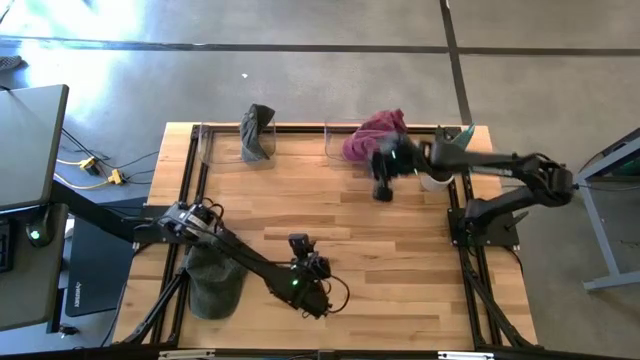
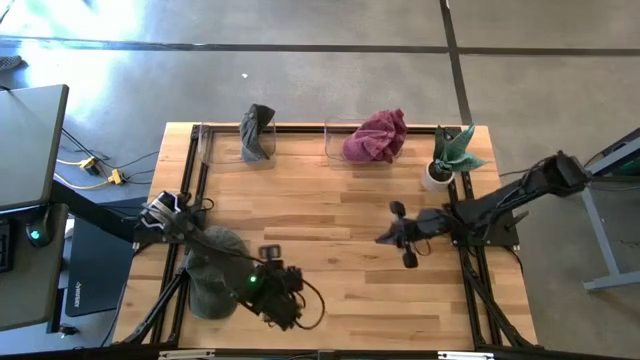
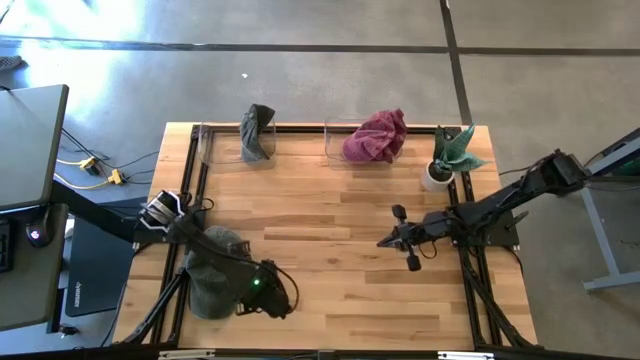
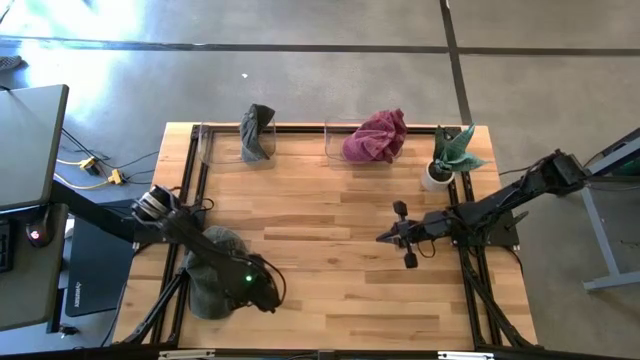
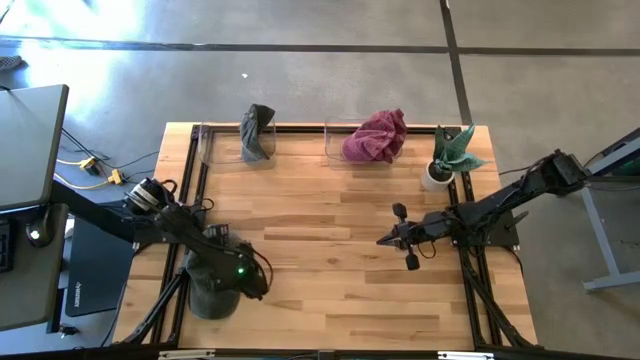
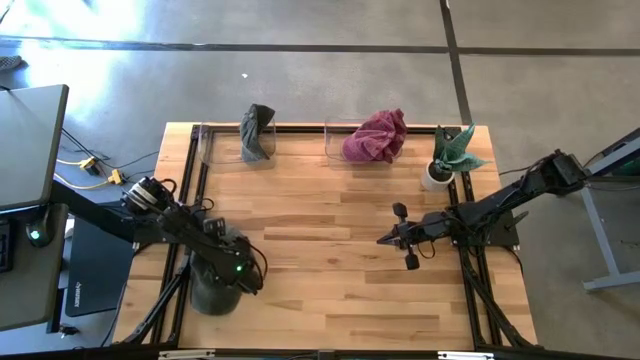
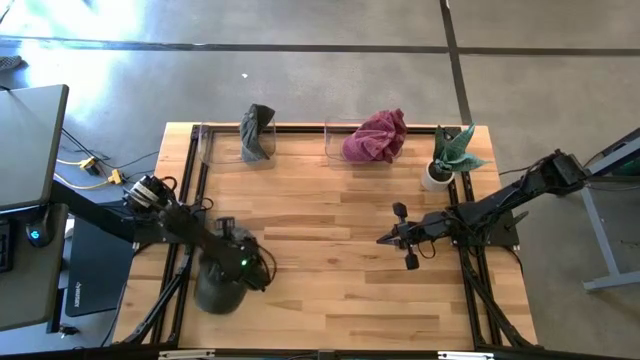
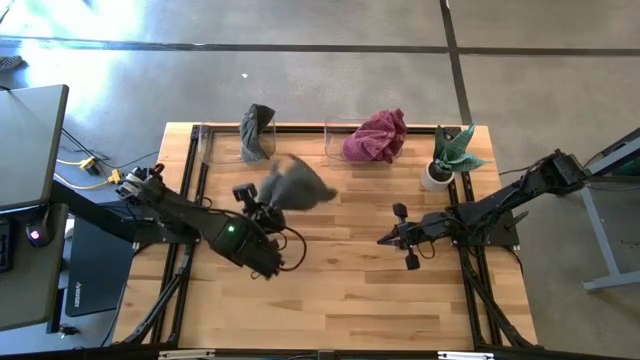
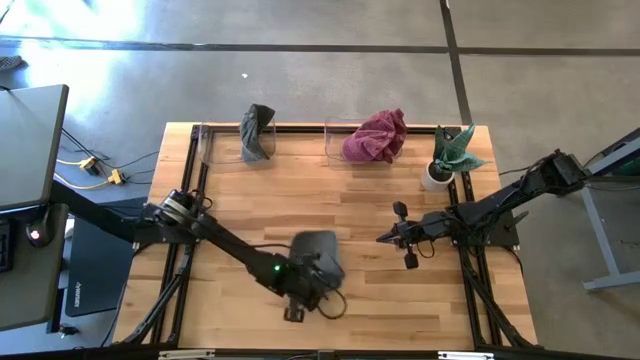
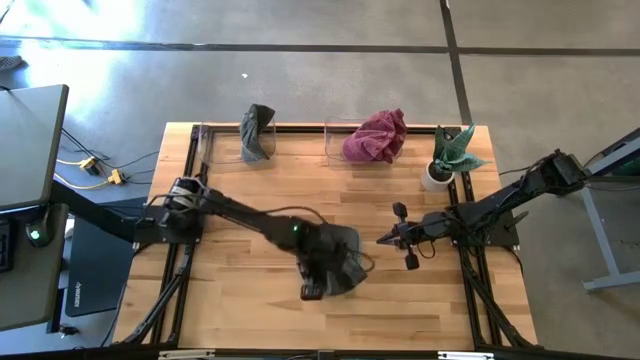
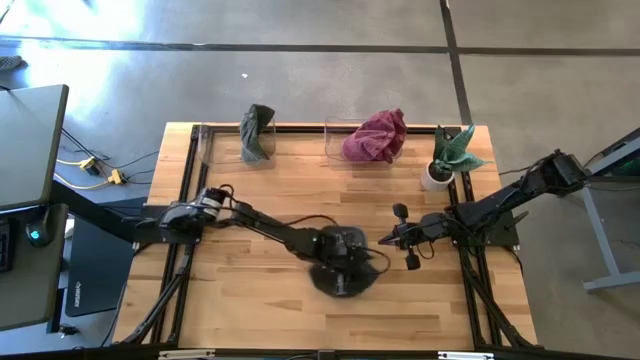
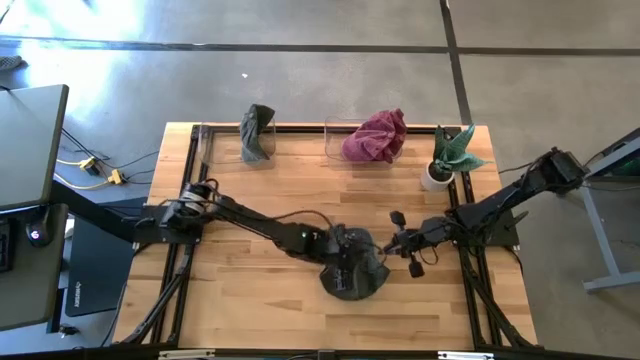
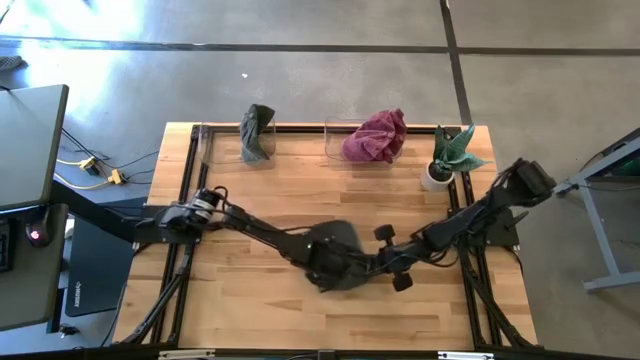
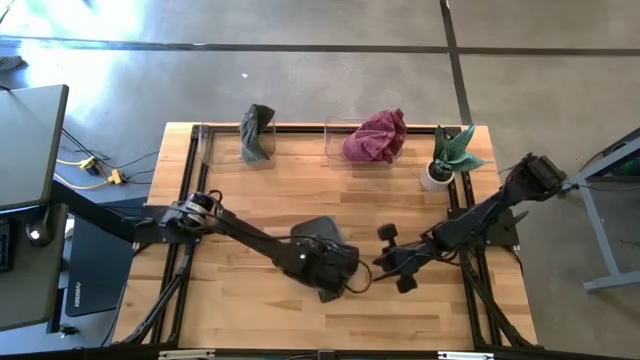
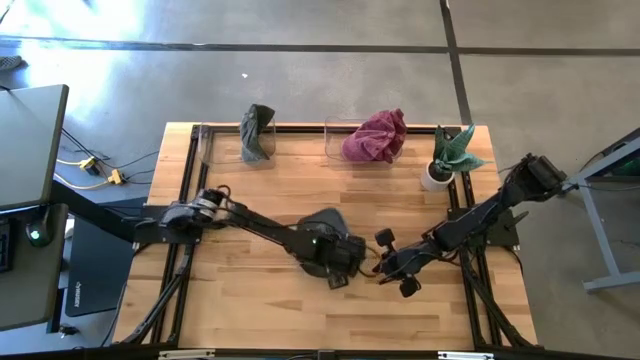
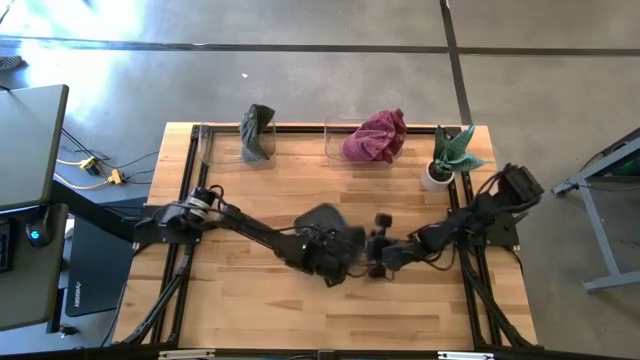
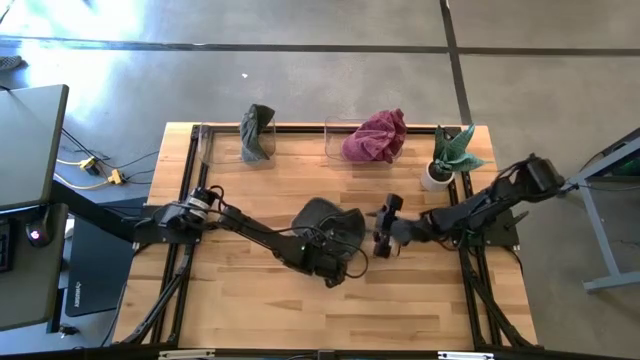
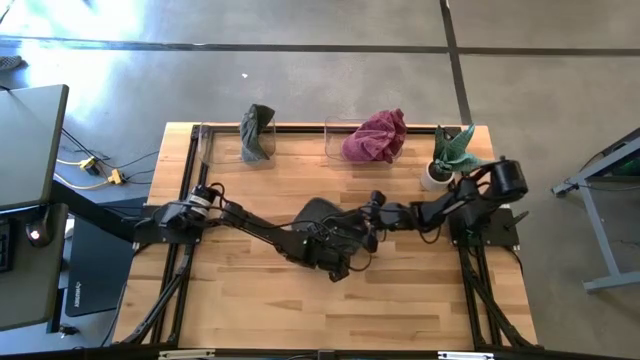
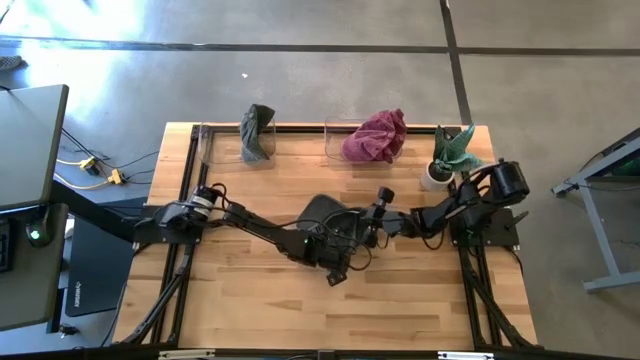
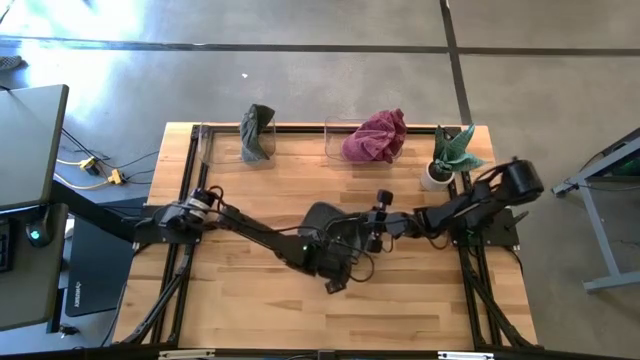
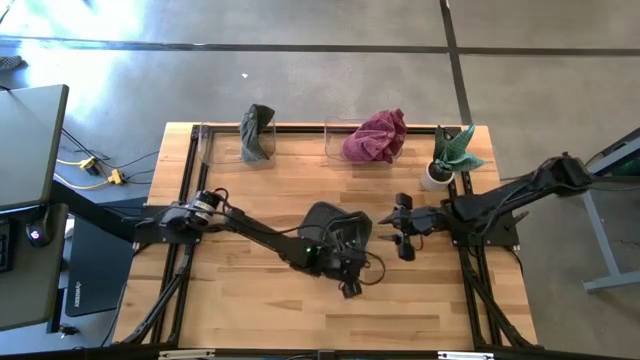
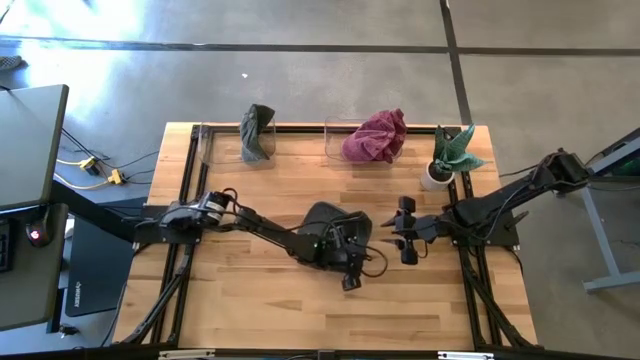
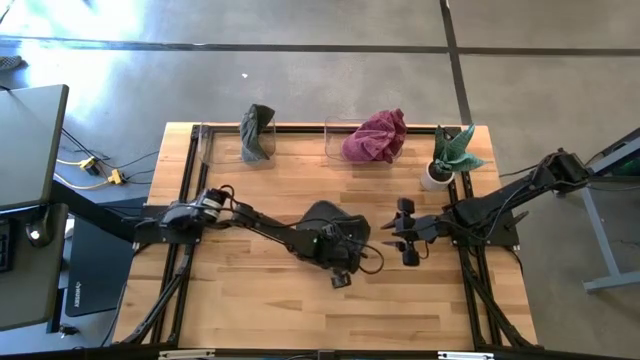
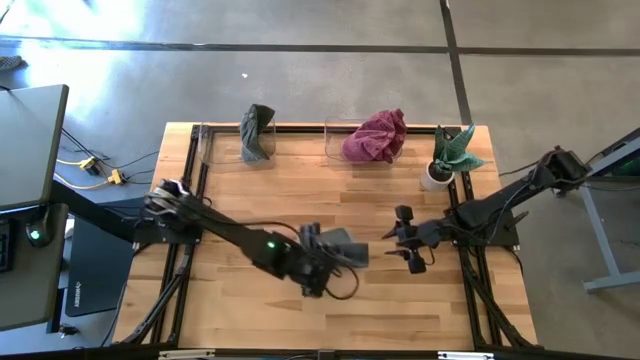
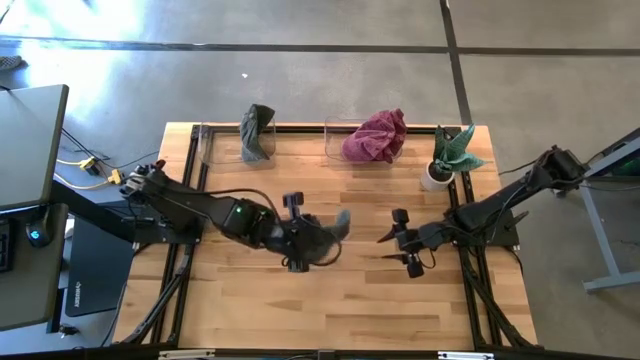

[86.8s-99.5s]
Task: Pick & Place hat
Put the black cap into the left transparent bin

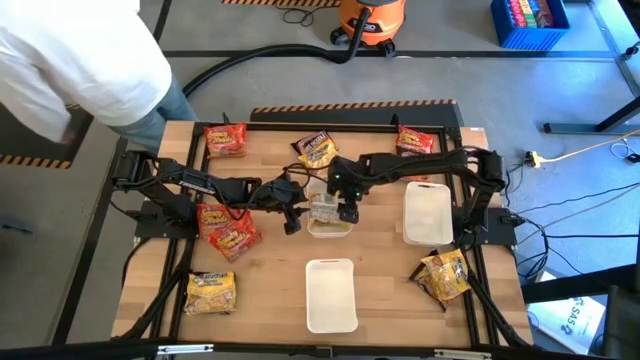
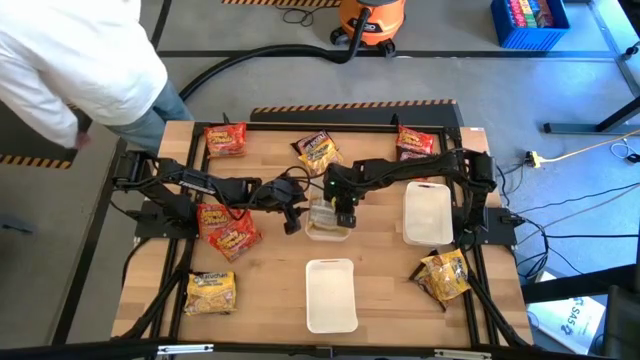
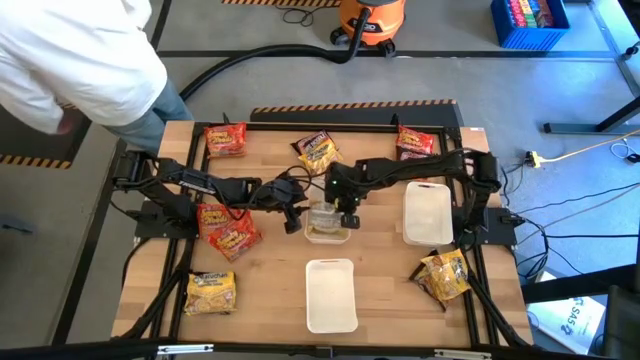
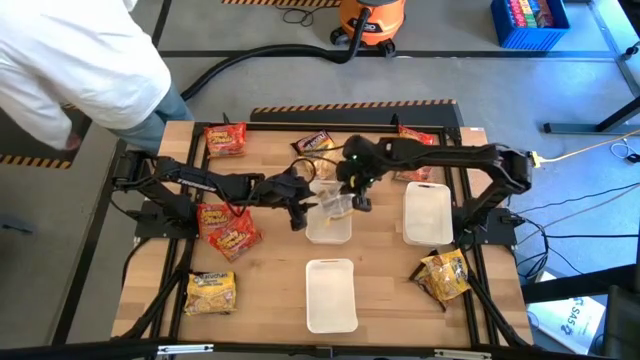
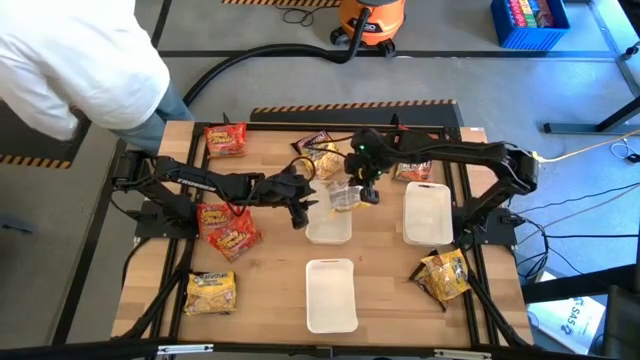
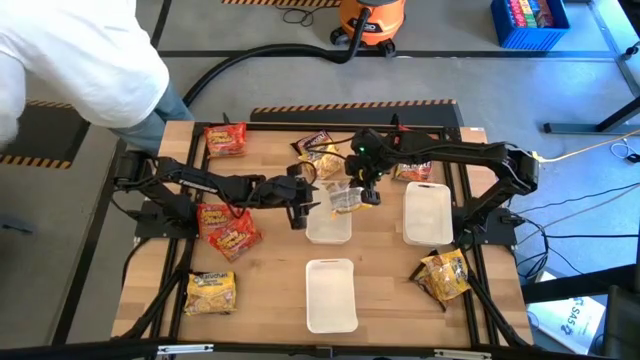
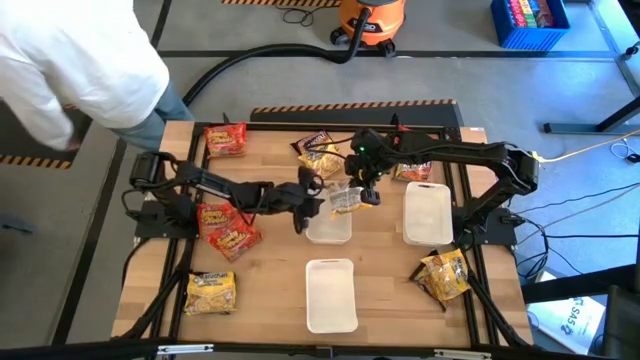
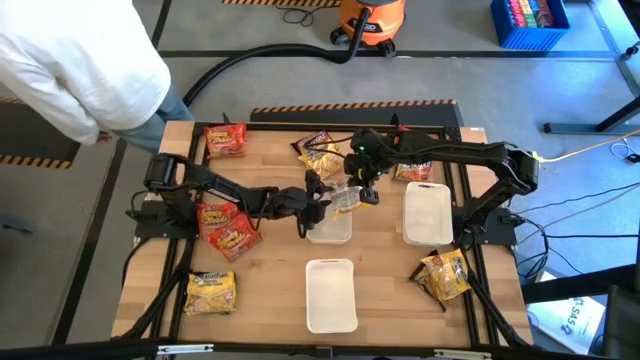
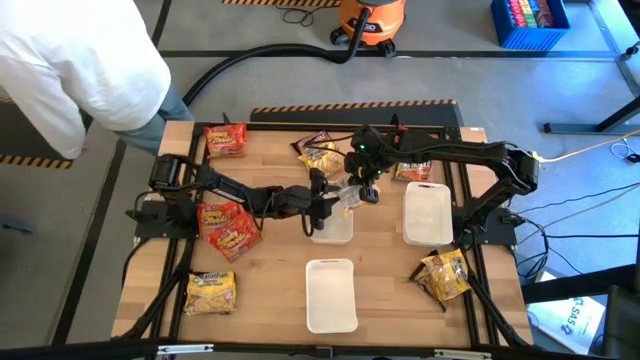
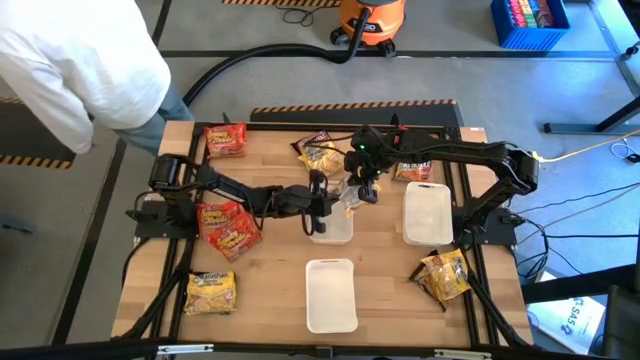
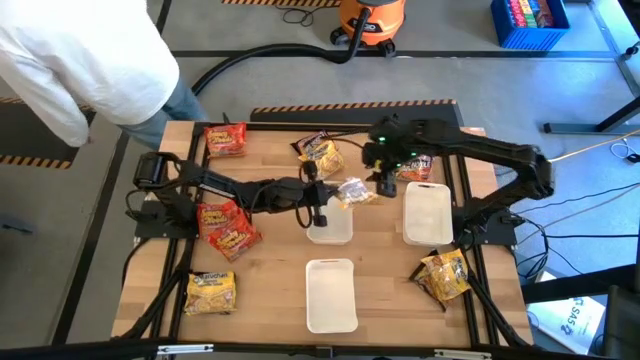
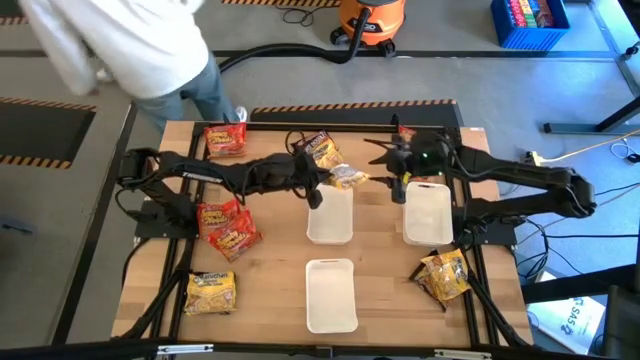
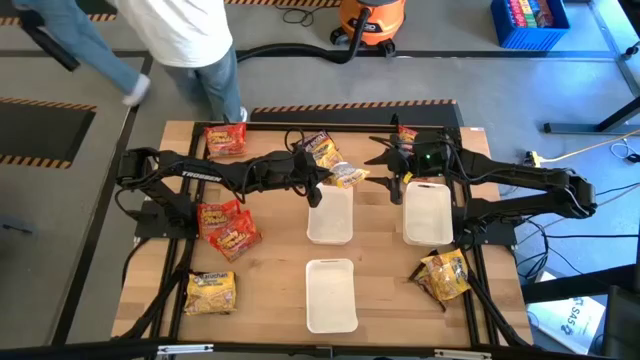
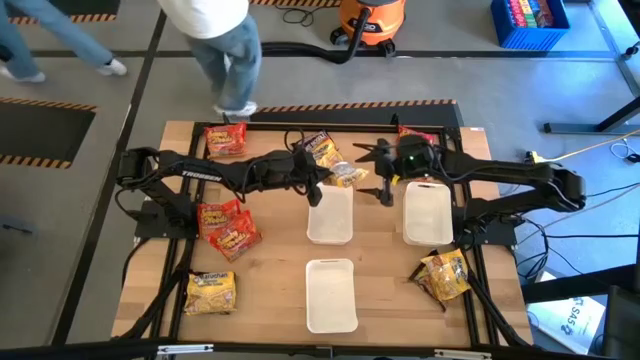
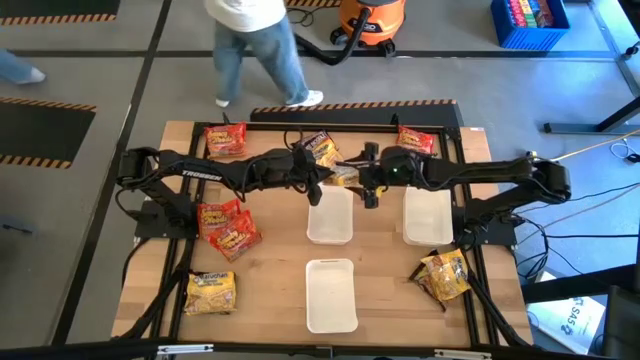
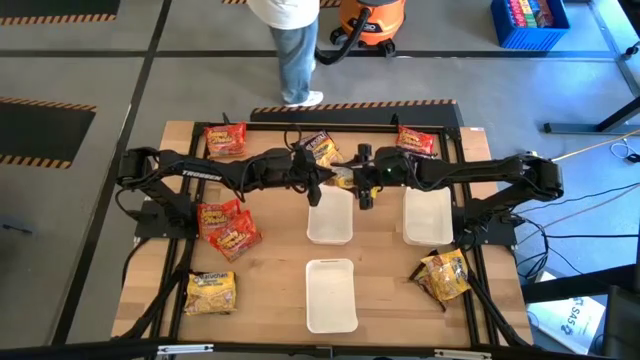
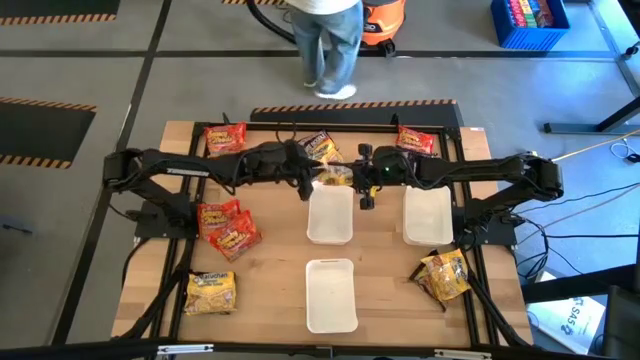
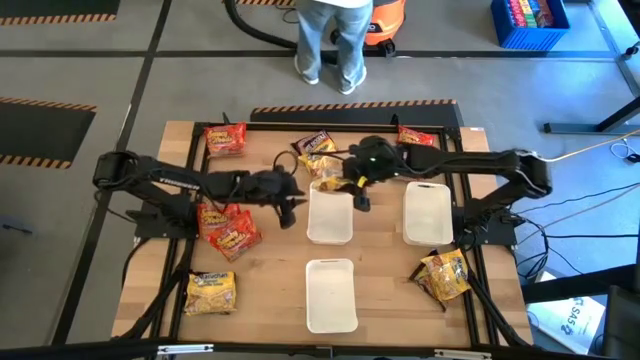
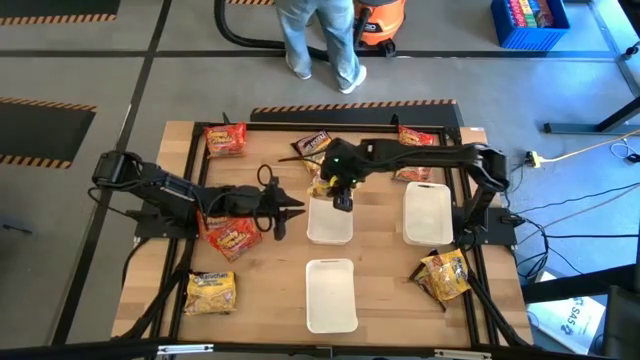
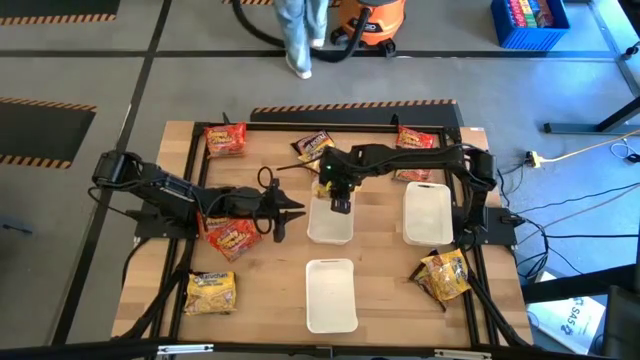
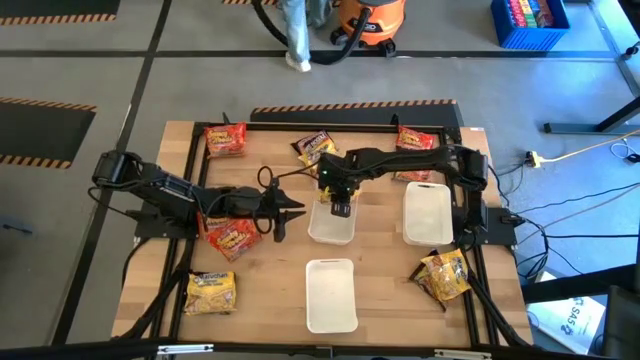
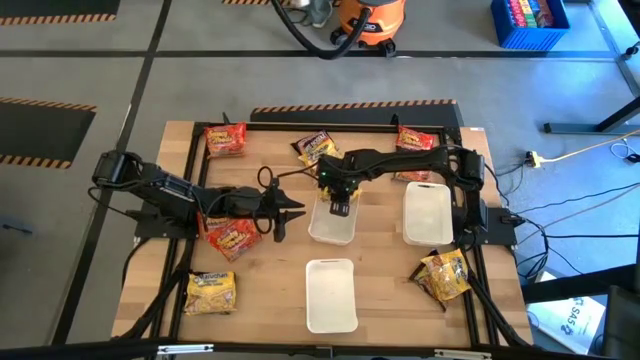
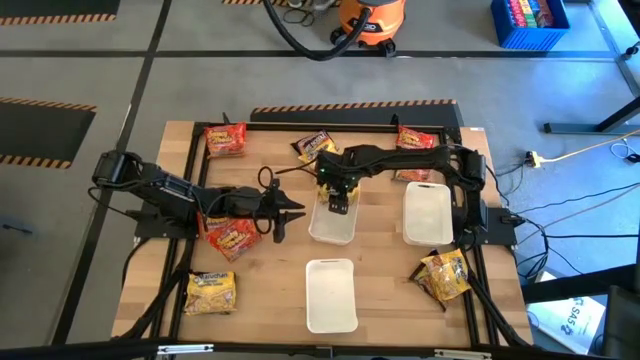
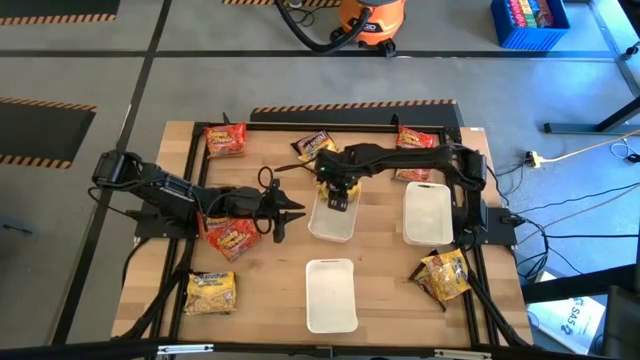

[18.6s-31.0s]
Task: Sort Maruchan noodles
Put the top left yellow noodle pack in the top left white bin
